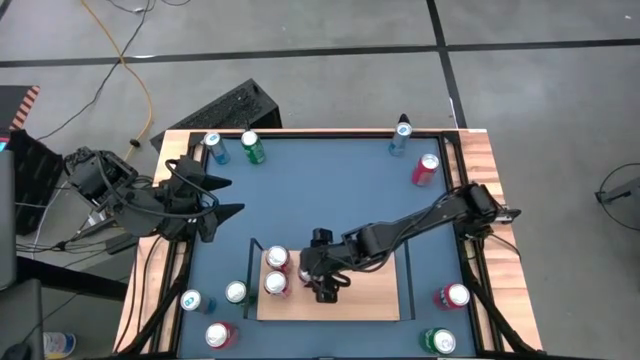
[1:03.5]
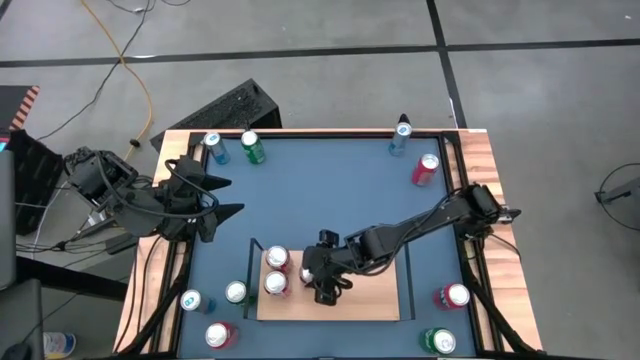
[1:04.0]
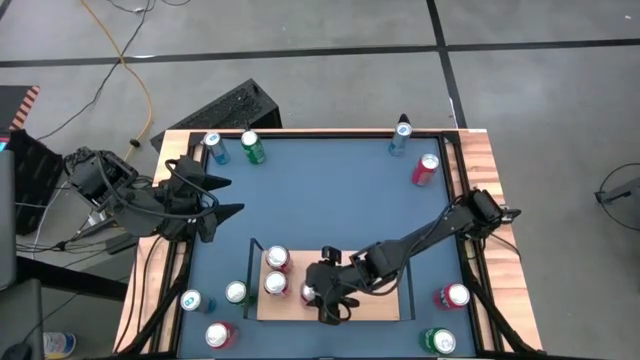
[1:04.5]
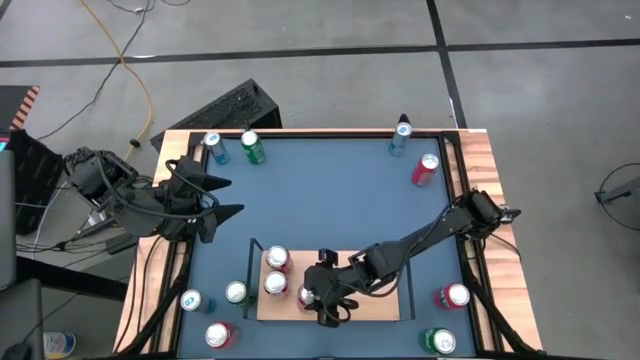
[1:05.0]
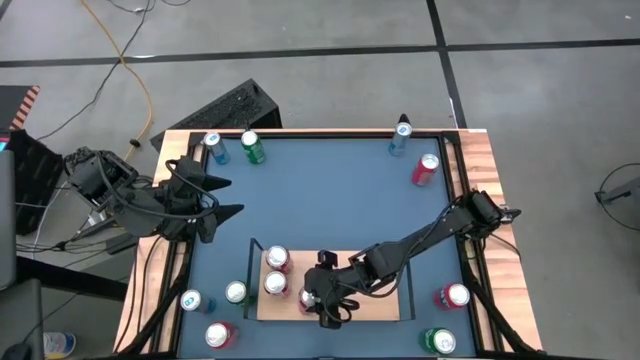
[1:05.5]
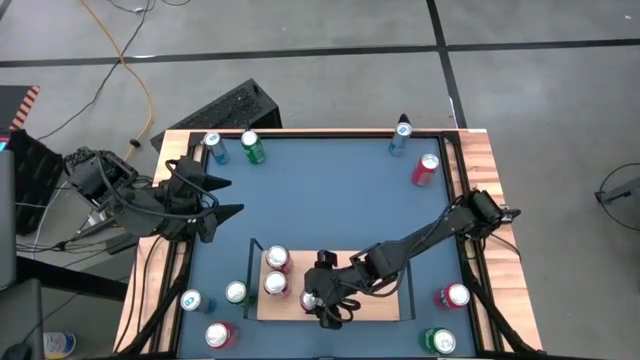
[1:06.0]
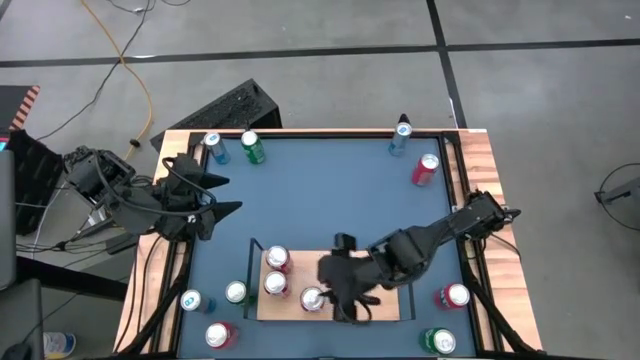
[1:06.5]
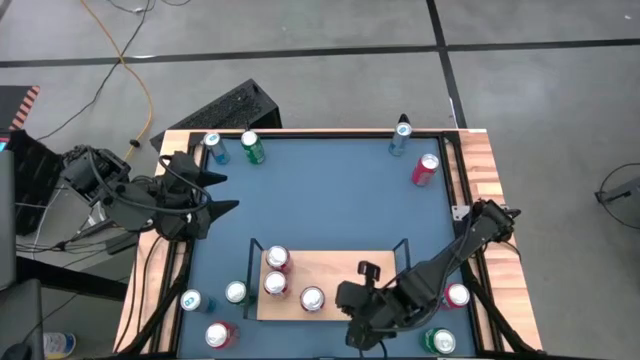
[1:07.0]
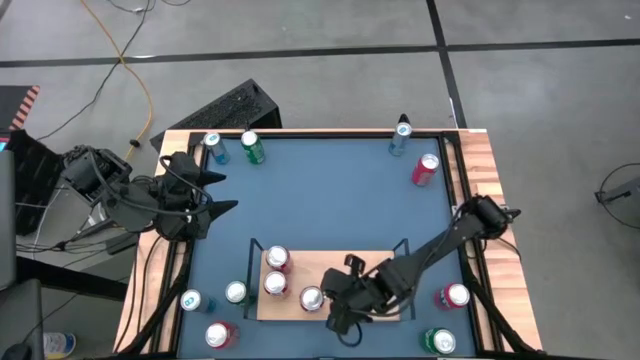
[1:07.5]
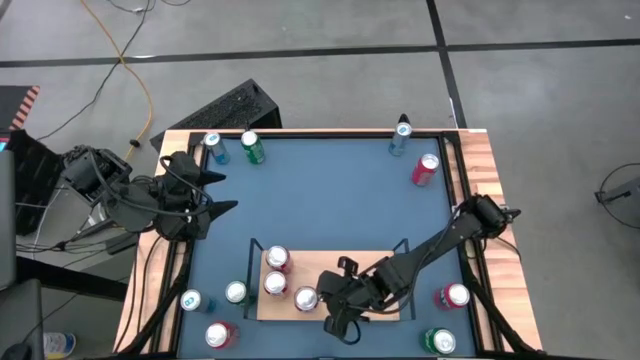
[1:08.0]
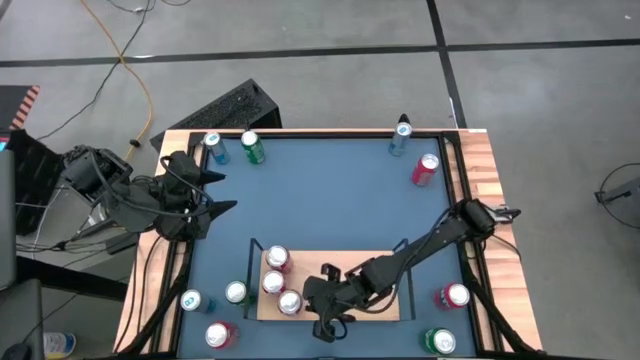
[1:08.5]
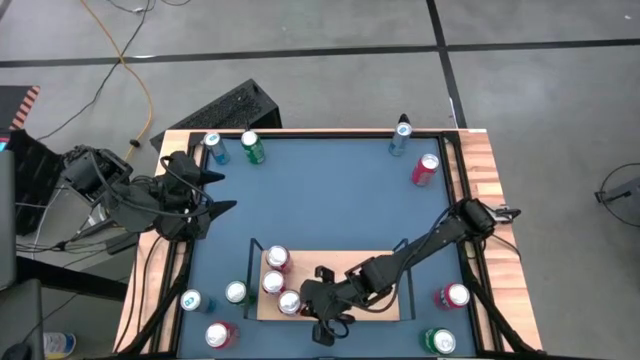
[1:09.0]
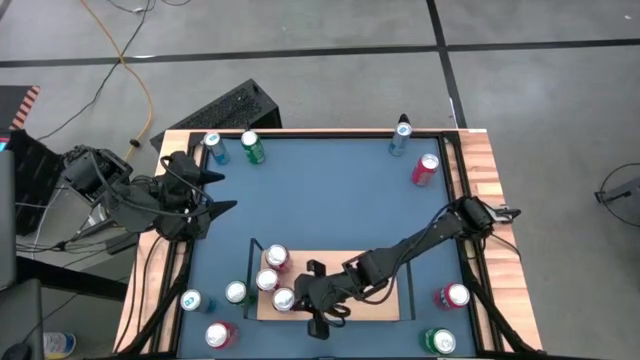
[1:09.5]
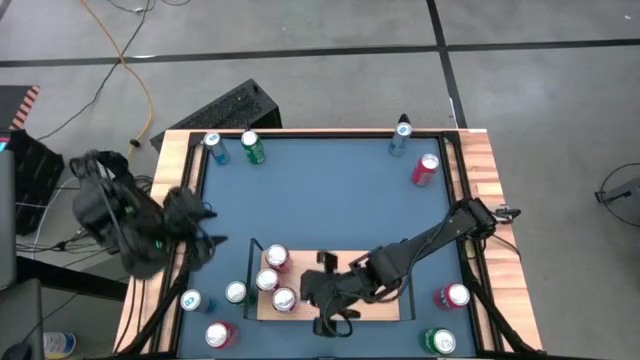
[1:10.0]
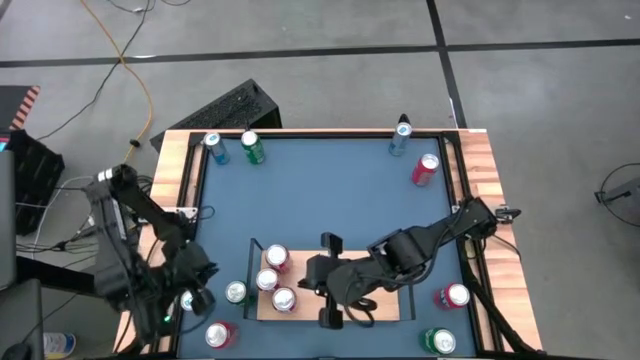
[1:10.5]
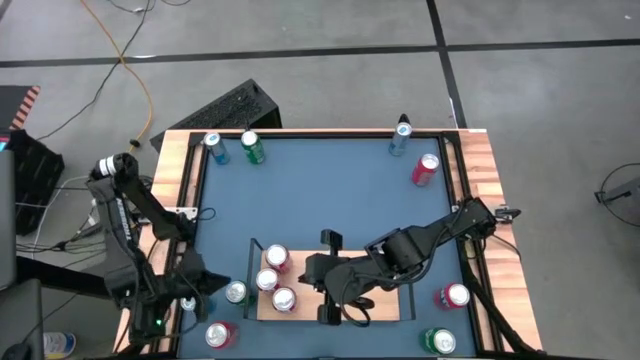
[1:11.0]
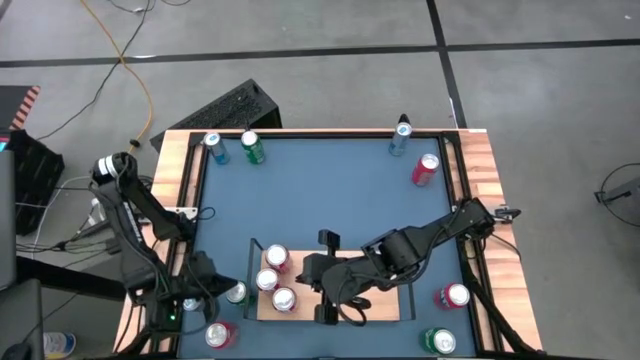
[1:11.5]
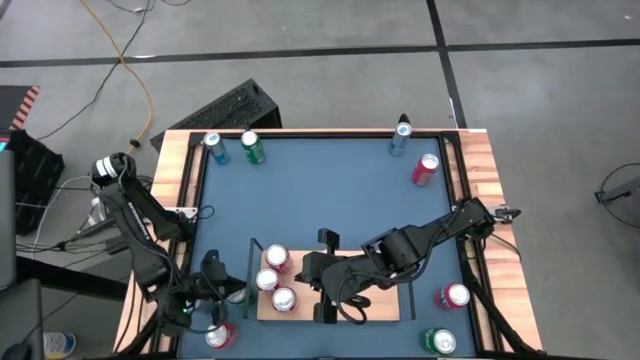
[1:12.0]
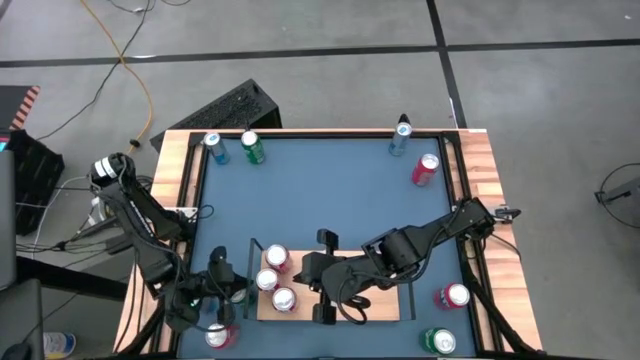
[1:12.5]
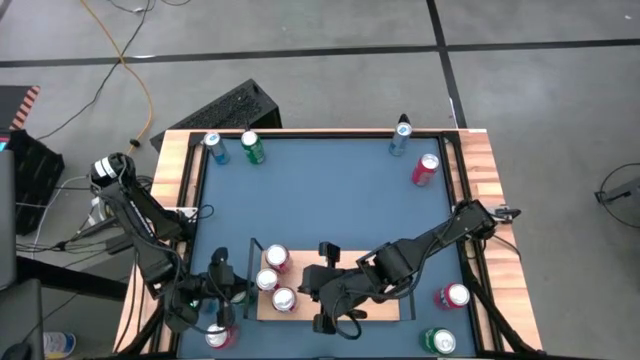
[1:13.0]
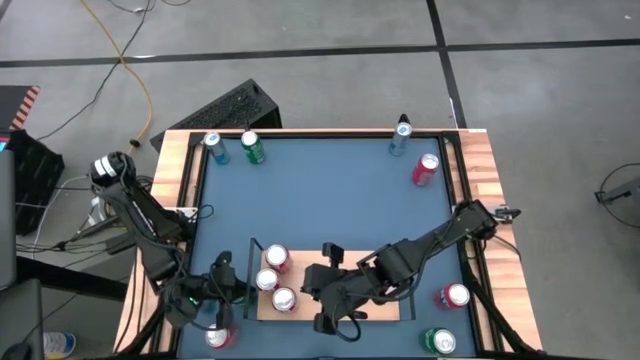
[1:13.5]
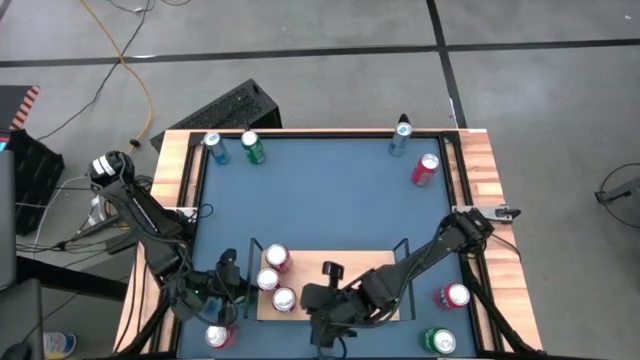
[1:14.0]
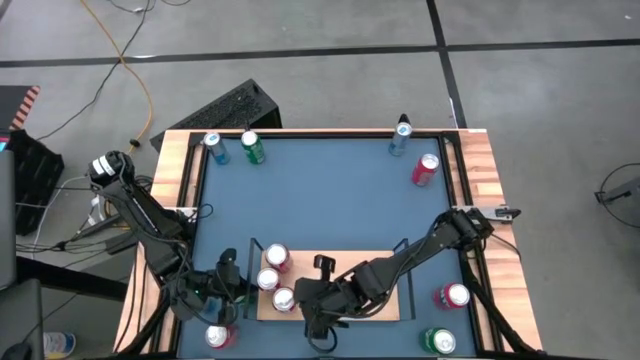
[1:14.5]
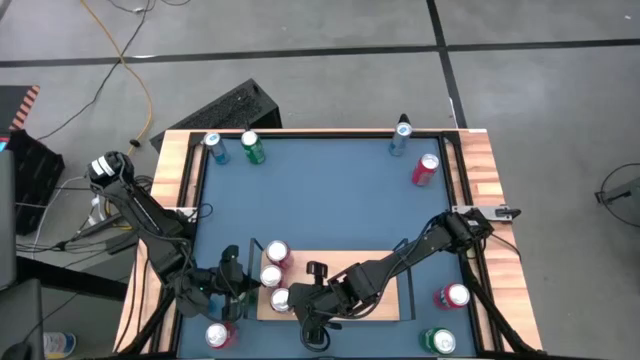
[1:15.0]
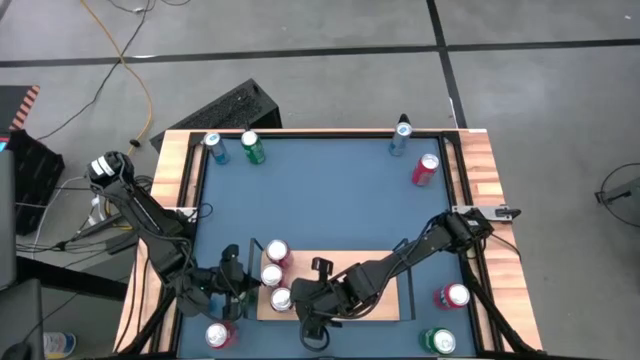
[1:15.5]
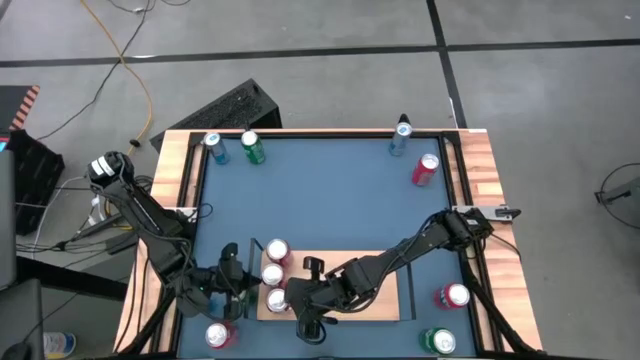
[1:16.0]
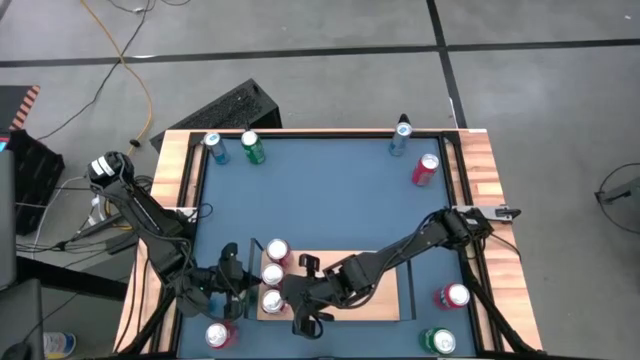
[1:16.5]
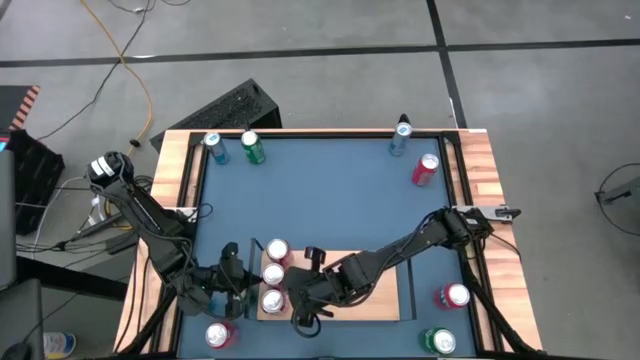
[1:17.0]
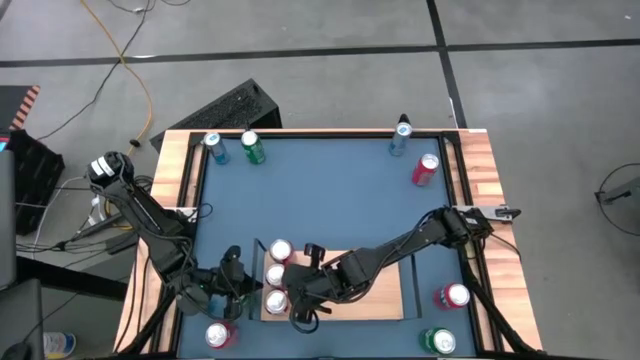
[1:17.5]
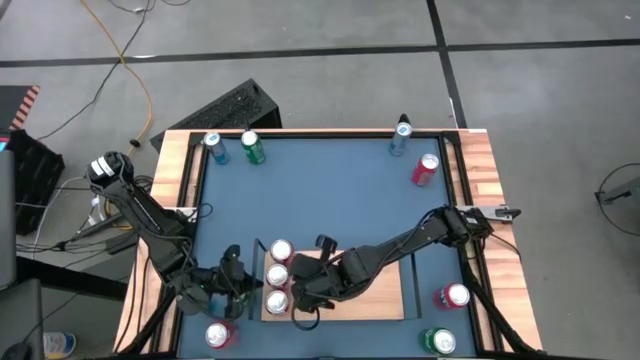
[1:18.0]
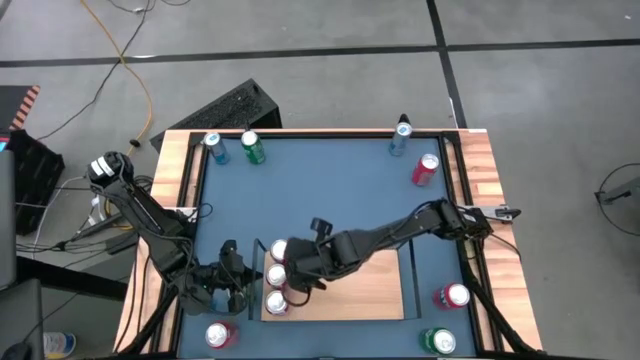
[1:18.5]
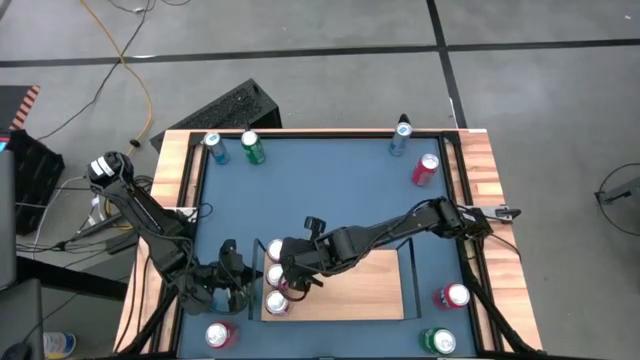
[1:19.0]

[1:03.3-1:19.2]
Task: Place canned beverage on shelf
Put the red soda can on the shelf aligned with the other red soda can

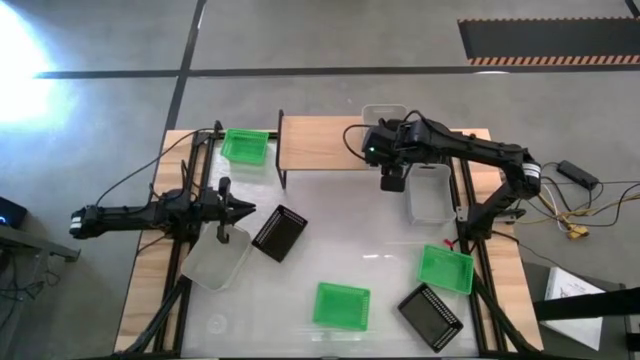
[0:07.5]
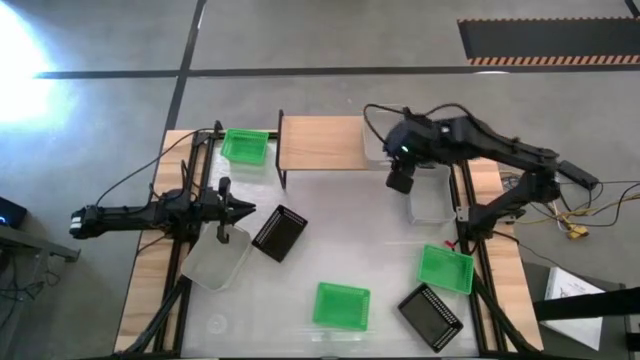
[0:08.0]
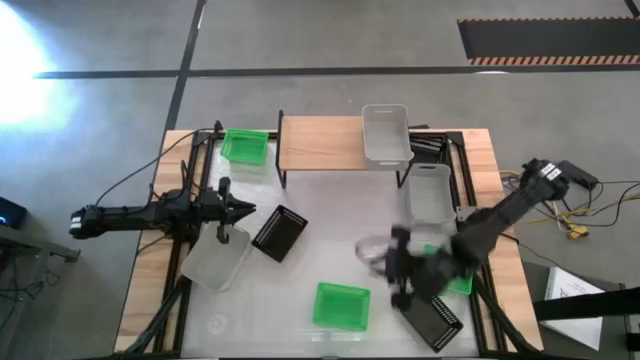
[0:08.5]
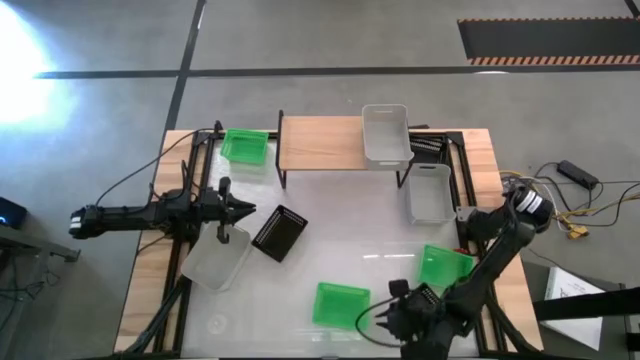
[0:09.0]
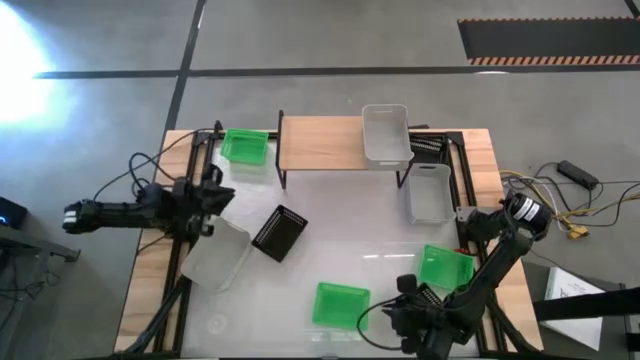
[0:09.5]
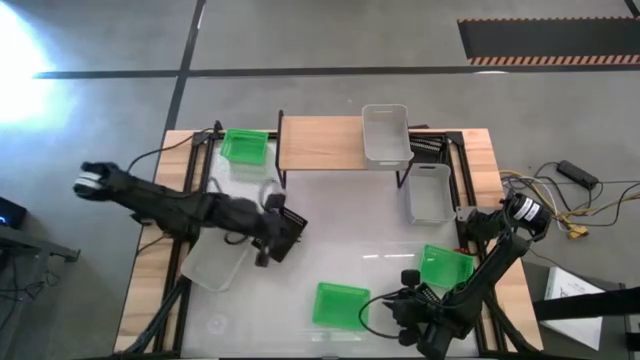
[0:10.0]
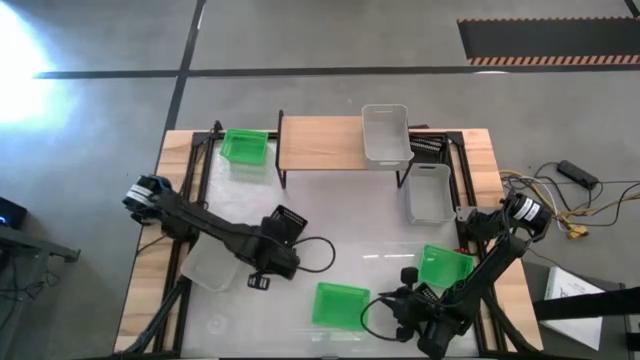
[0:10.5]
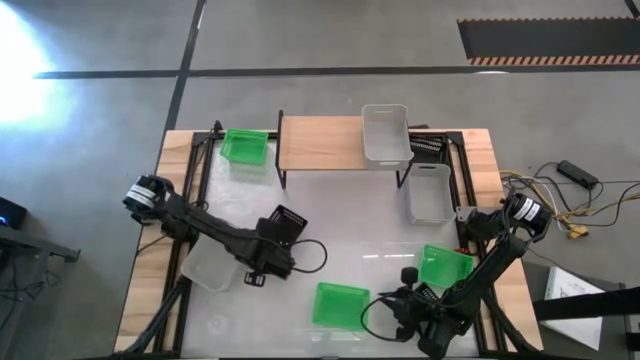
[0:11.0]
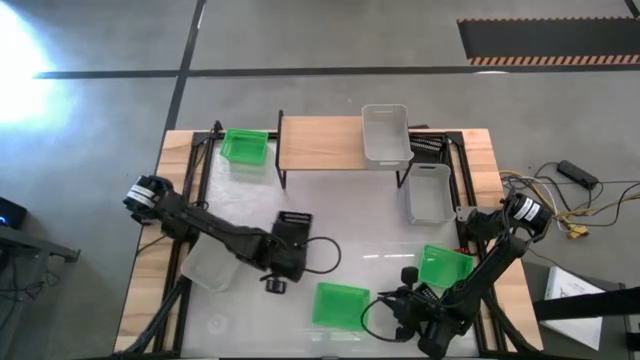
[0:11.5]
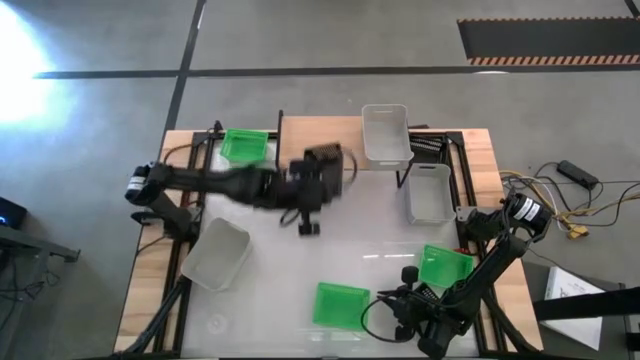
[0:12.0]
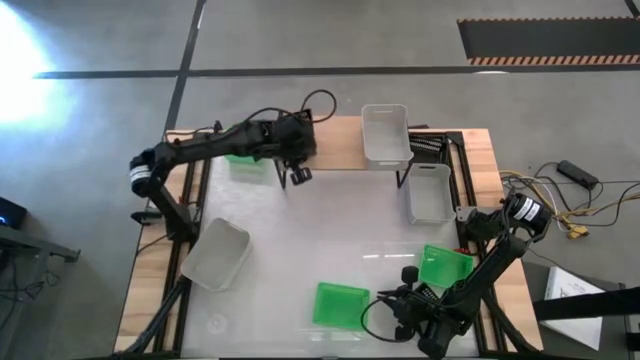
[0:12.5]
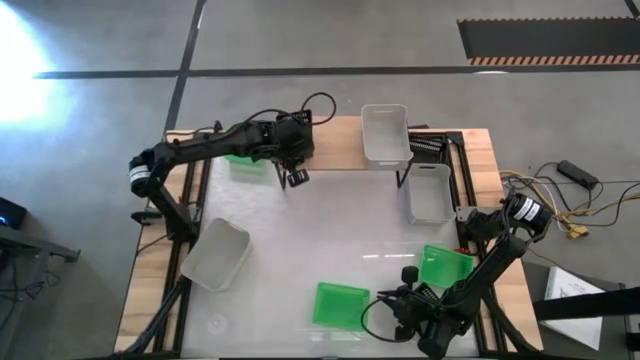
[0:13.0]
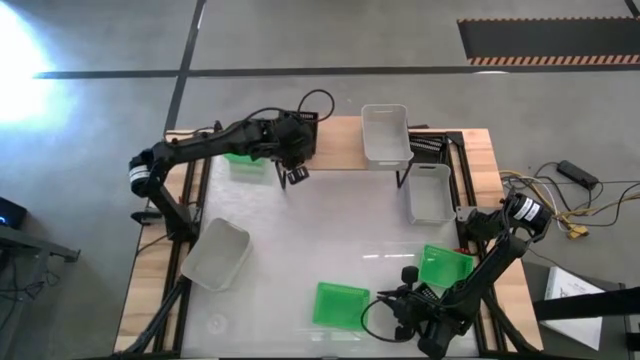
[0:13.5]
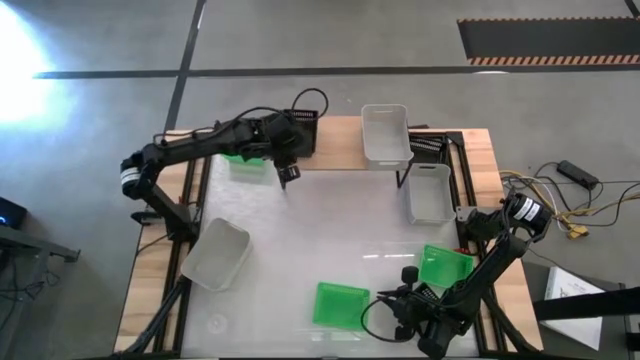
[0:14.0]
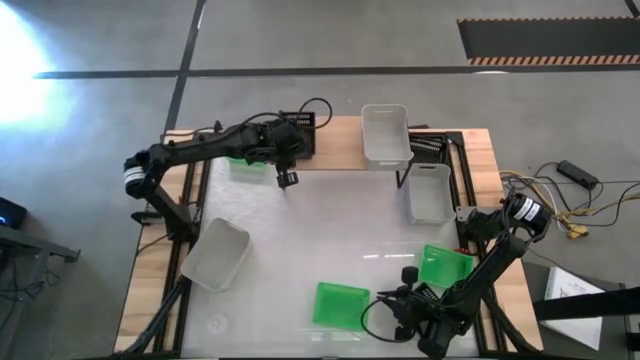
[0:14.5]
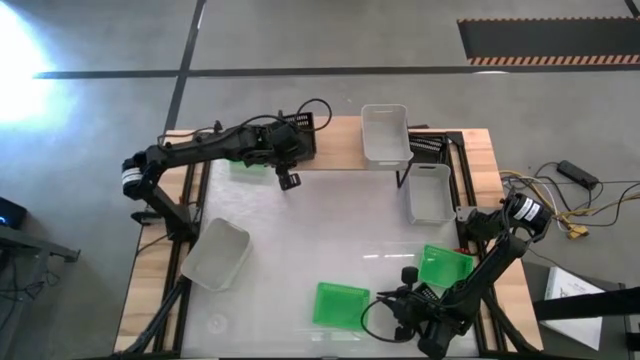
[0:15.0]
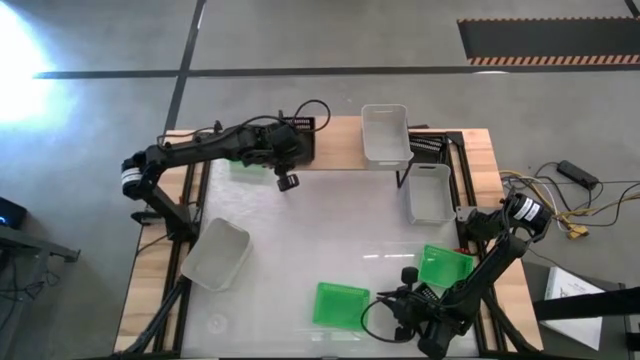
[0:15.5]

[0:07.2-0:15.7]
Task: Stack baskets on shelf by color
Put the middle left black bin on the shelf
